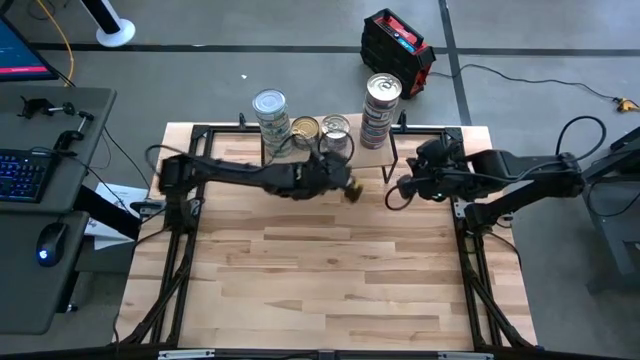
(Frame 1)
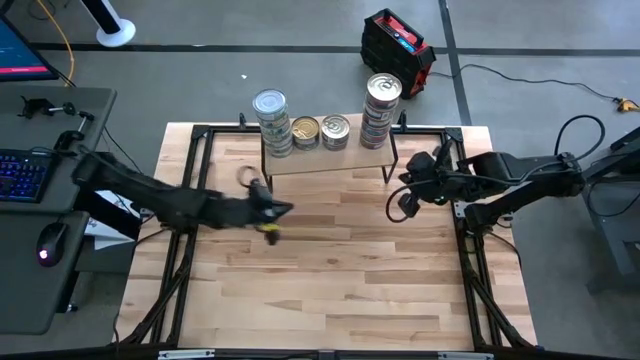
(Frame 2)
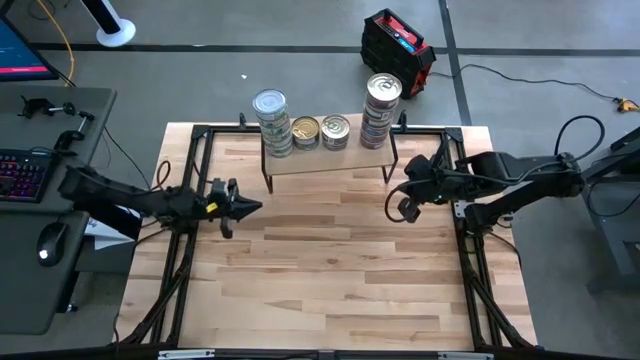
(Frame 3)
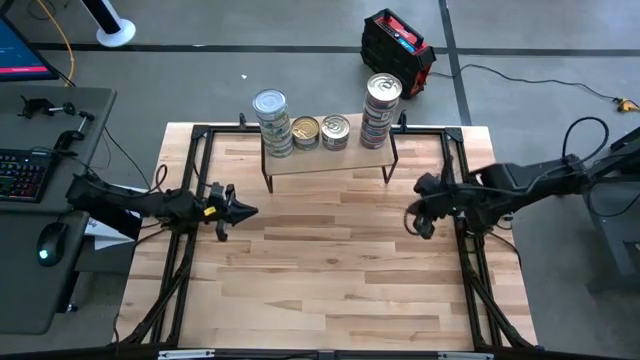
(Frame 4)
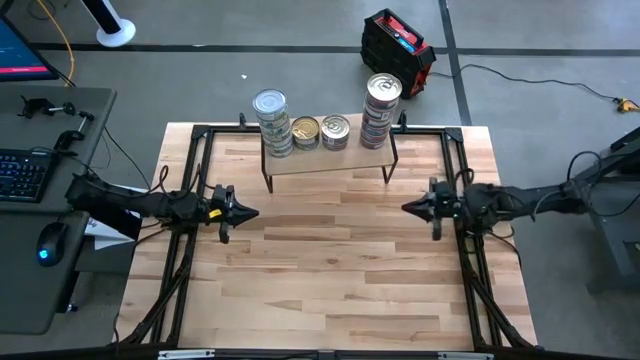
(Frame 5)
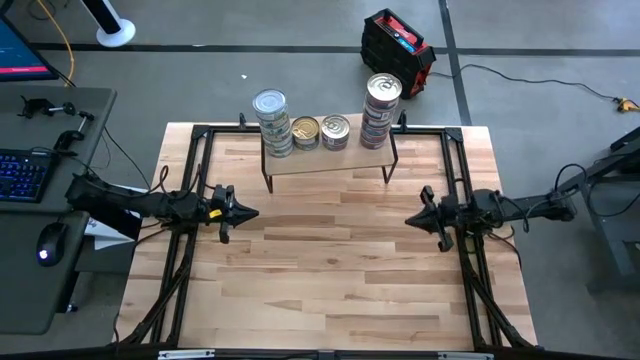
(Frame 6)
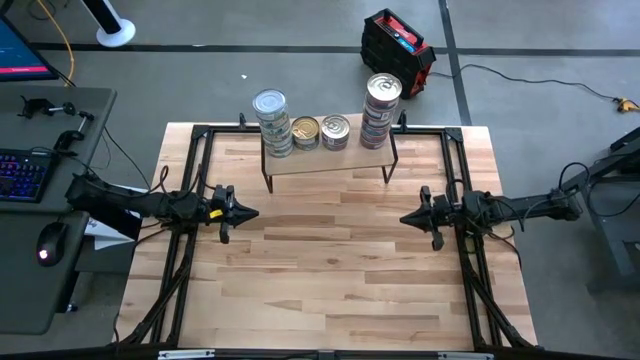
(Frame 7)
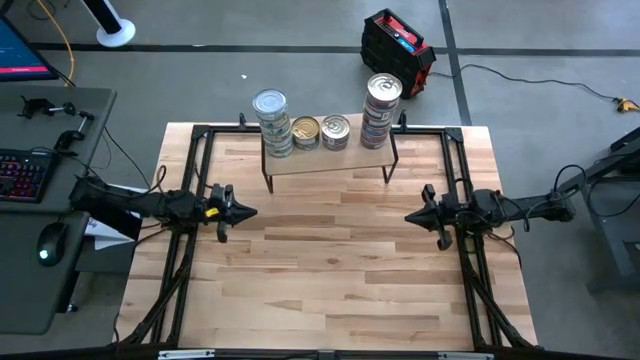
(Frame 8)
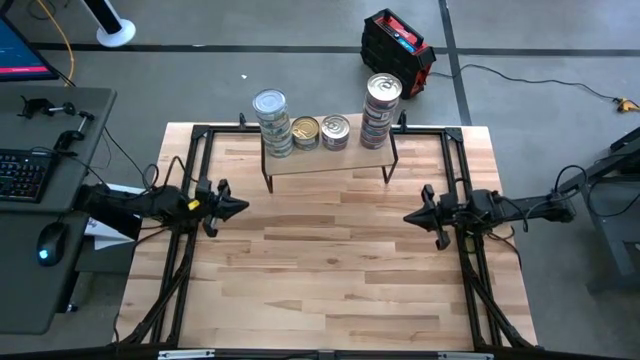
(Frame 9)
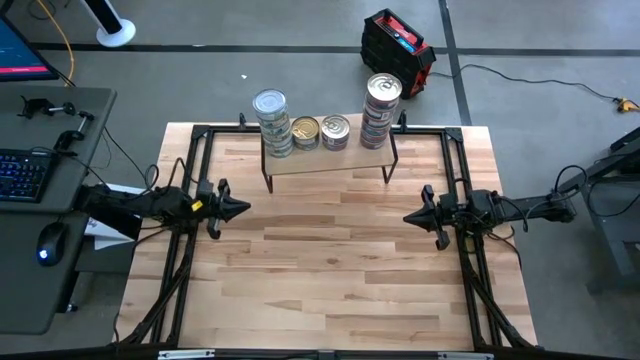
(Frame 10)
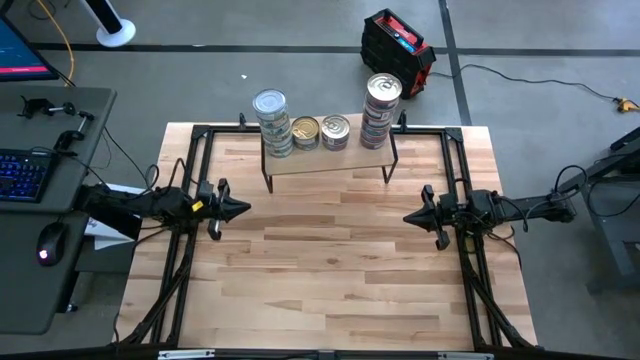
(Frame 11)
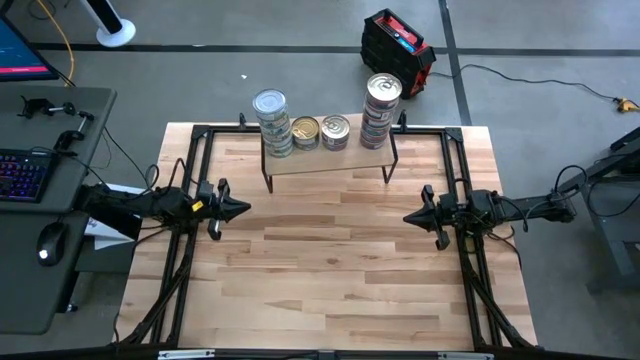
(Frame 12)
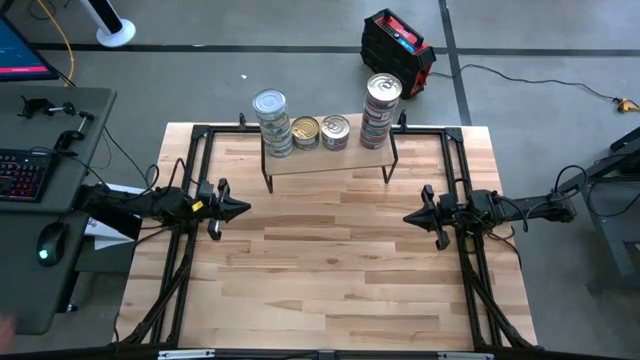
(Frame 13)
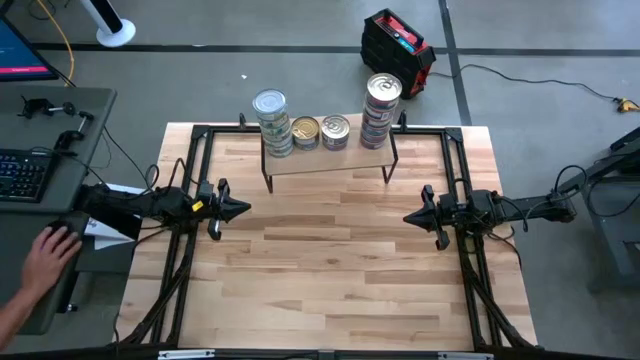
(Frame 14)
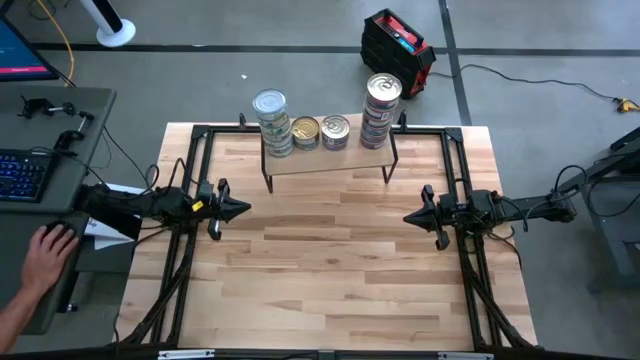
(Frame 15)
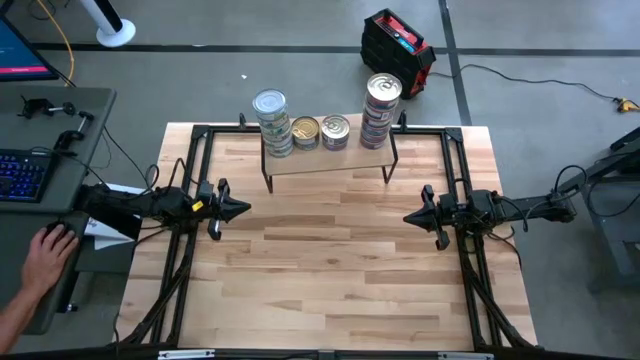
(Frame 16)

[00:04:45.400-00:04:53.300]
Task: Stack canned seafood by type on shelf
Return to Home Position

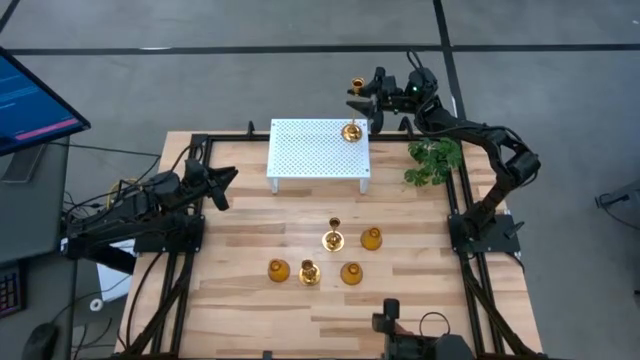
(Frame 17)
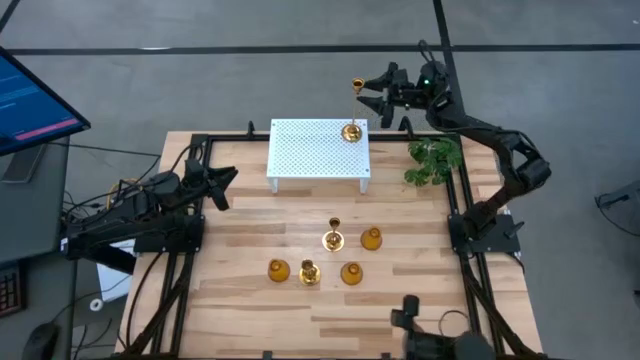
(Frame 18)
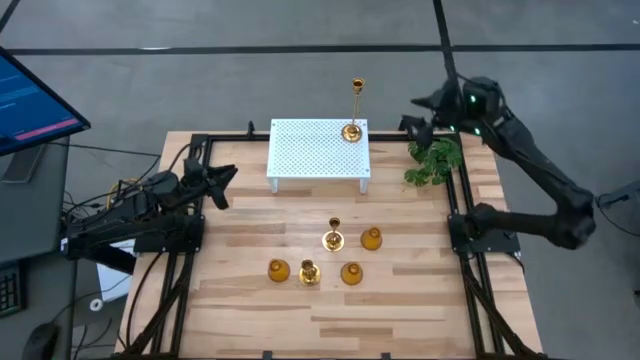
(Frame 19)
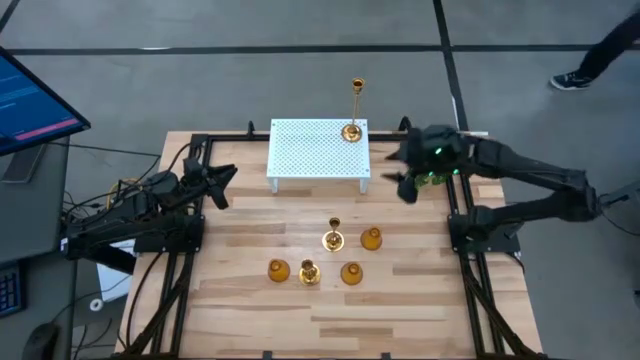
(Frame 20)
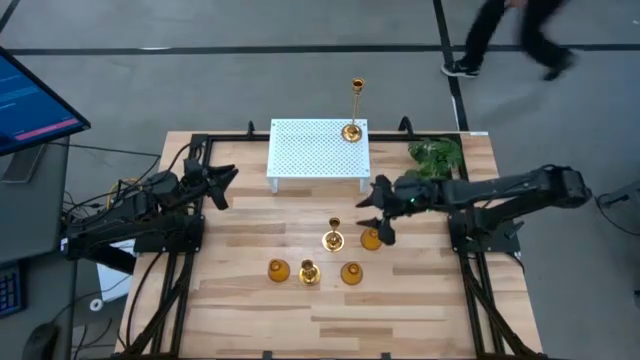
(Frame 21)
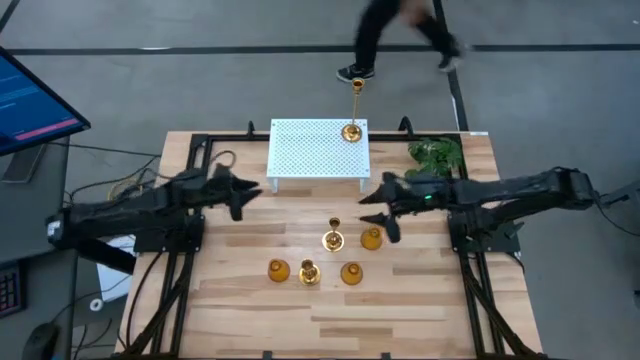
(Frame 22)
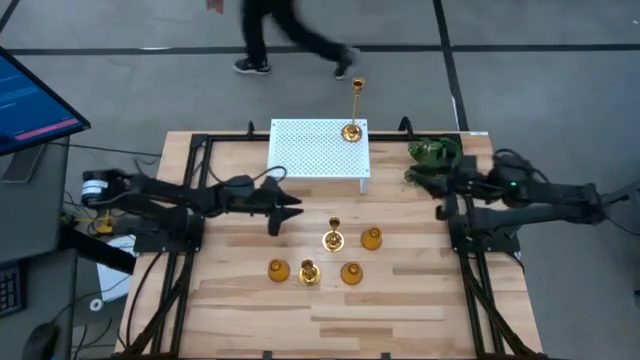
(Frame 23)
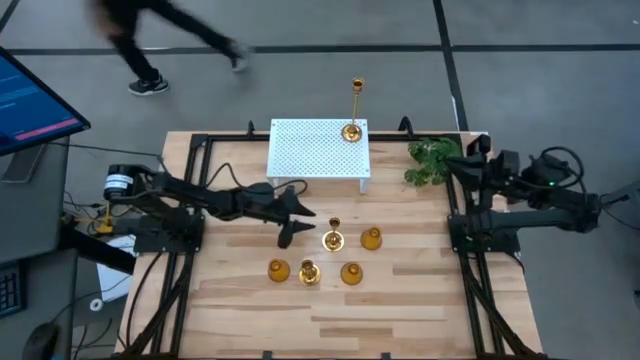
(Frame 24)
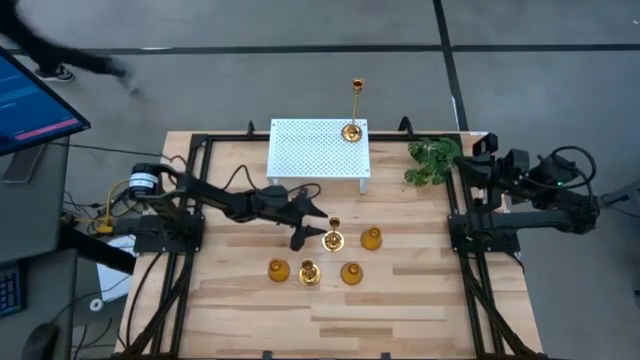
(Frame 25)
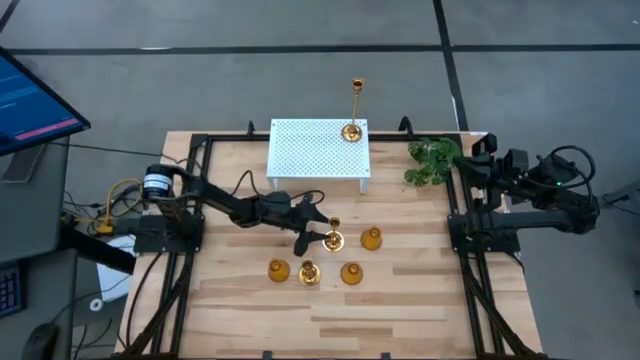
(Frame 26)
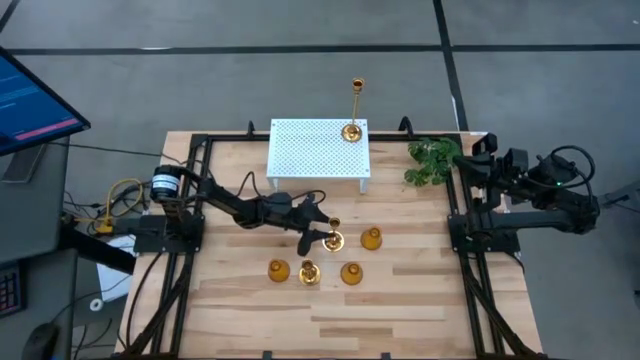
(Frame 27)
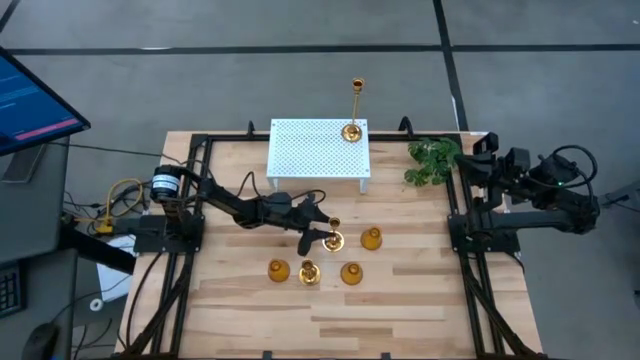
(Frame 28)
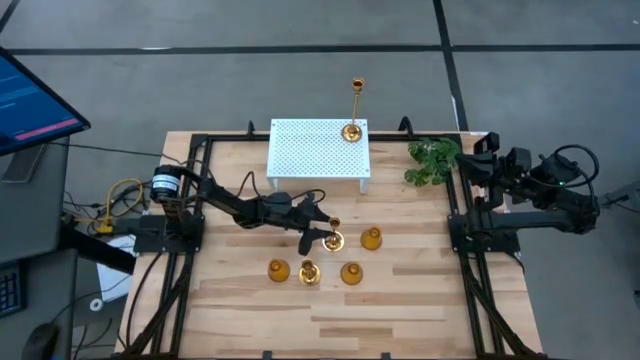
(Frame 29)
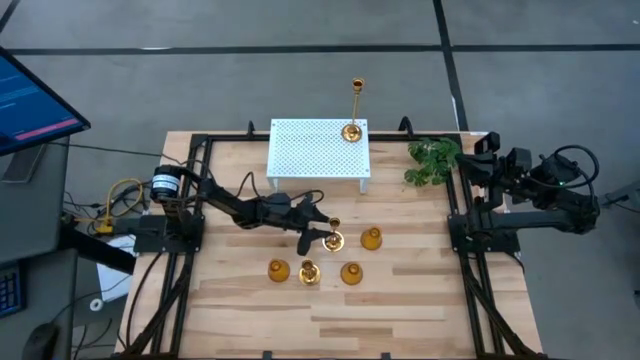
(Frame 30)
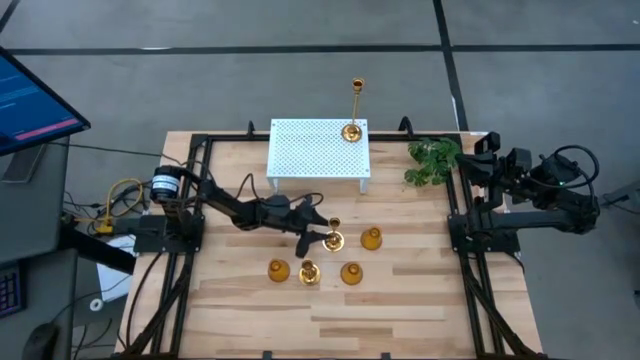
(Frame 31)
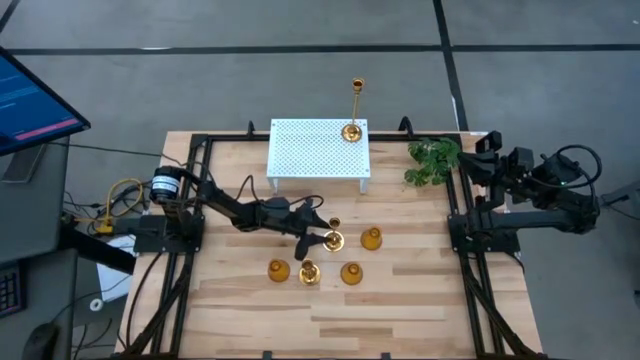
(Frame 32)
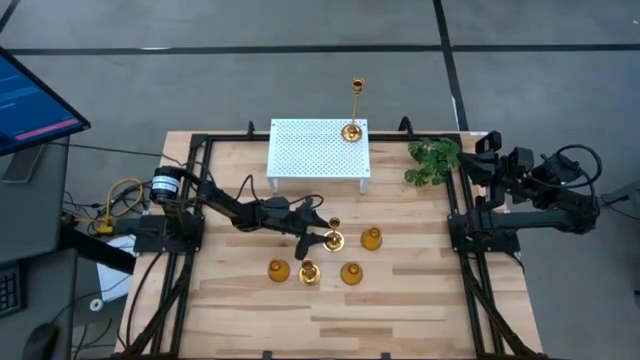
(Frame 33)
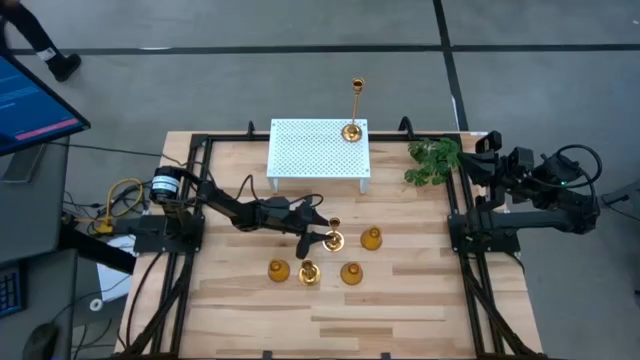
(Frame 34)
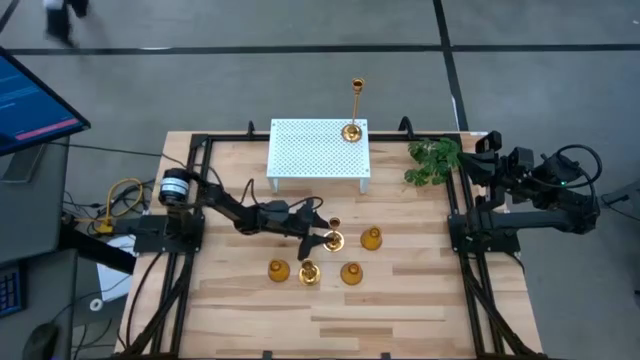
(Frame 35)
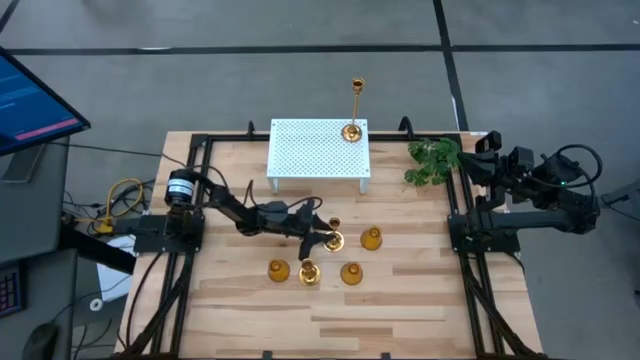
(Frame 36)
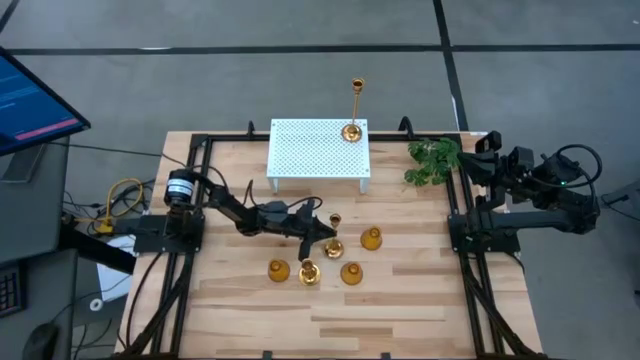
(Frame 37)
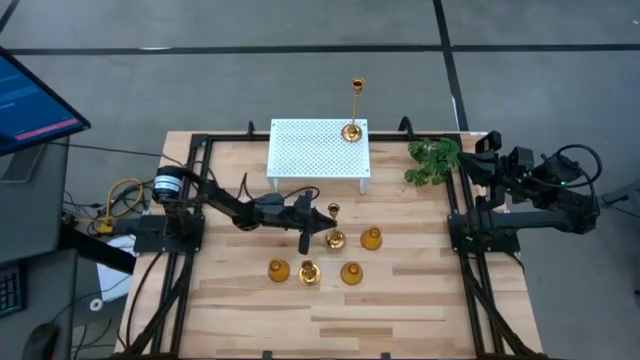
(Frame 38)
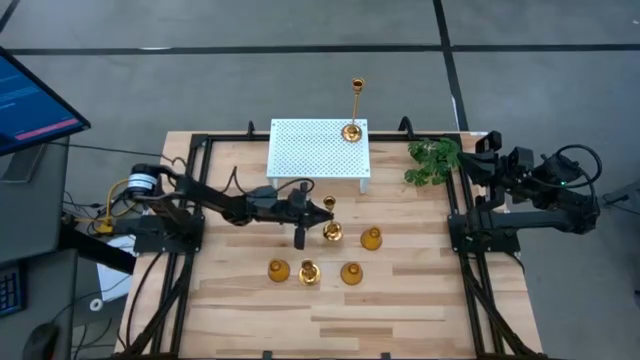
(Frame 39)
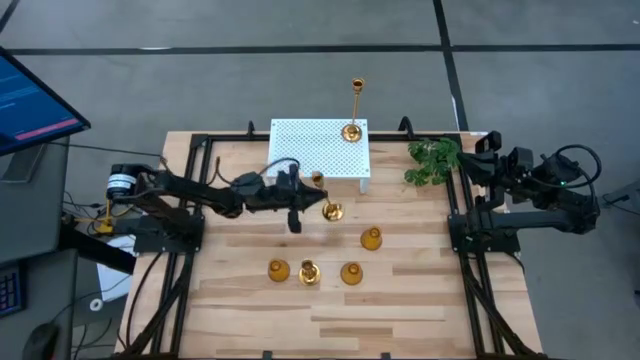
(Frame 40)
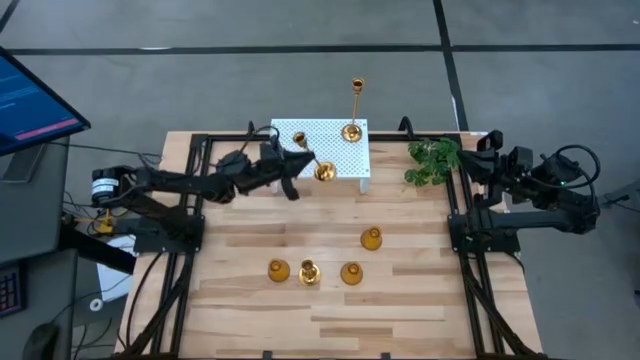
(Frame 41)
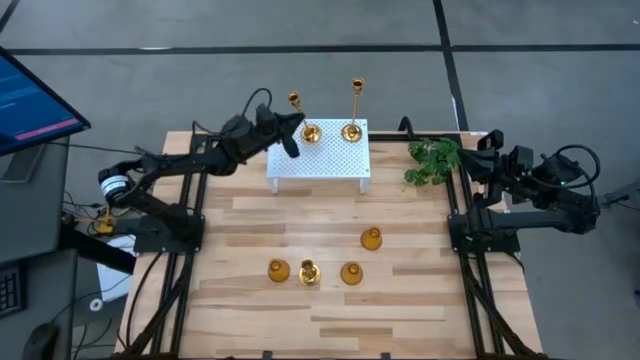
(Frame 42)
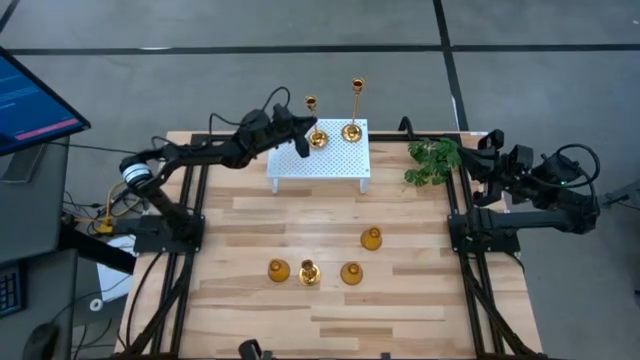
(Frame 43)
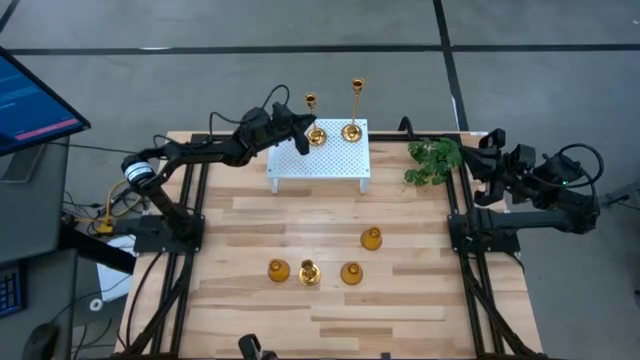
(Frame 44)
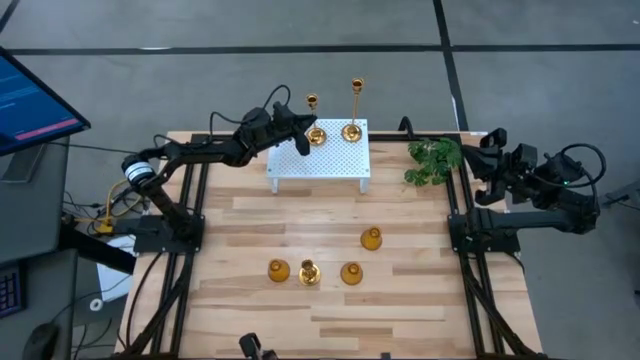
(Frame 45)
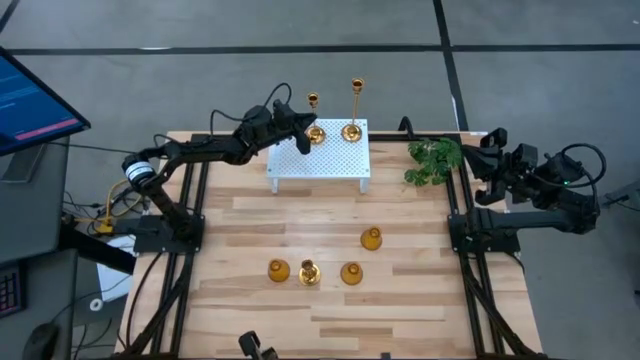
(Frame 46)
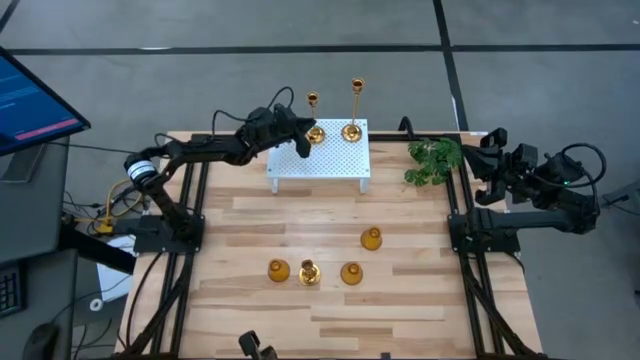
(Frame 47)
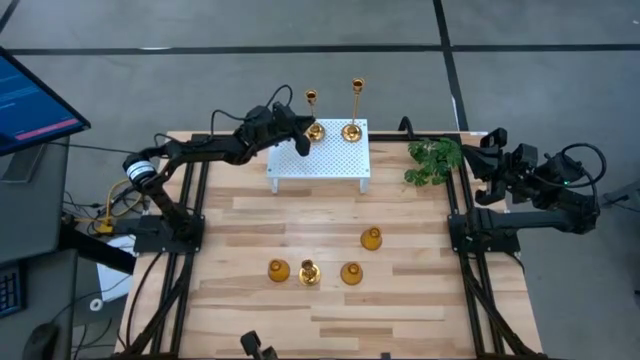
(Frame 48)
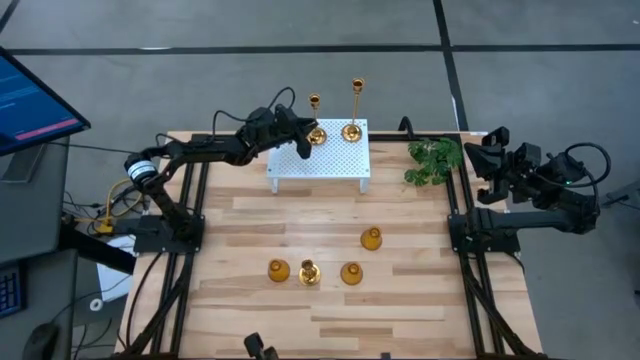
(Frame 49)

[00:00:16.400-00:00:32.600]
Task: Pick & Place candle stick holders
Put the medium gold candle holder on the shelf
